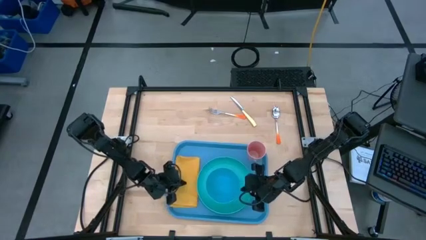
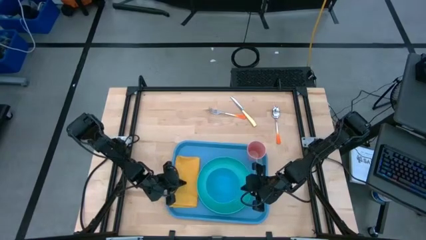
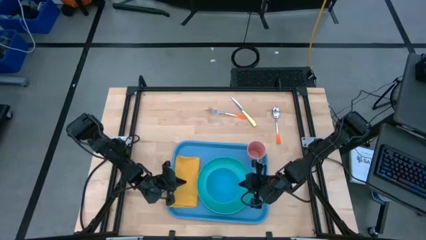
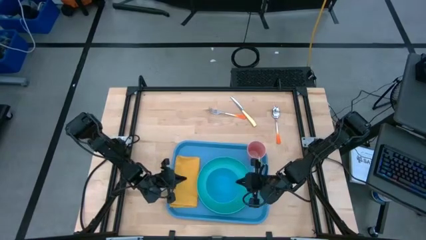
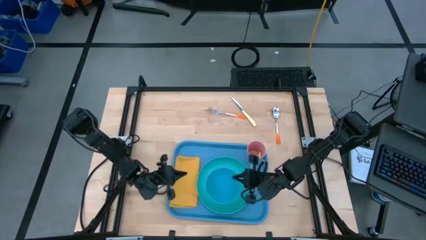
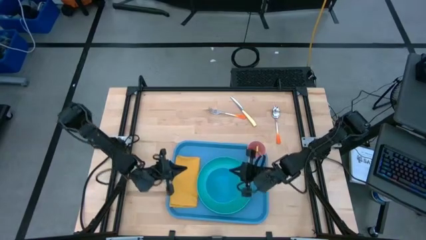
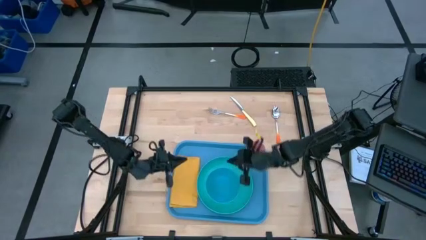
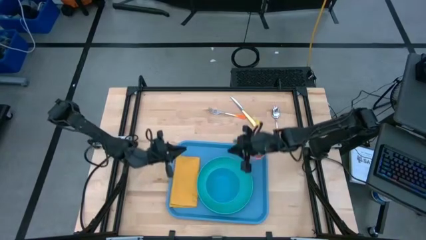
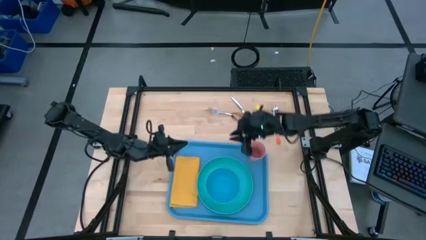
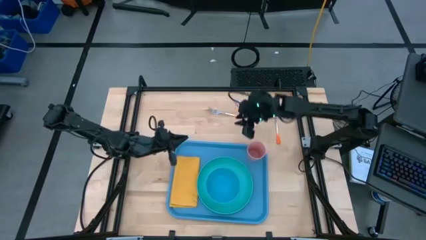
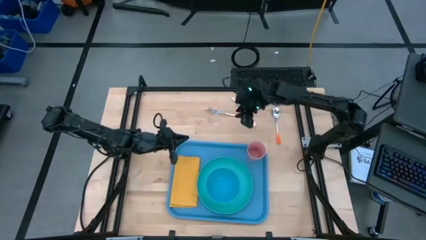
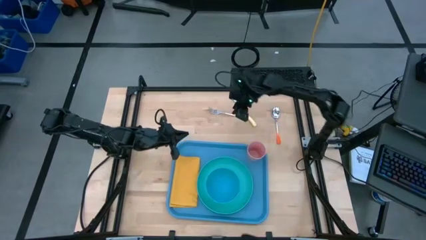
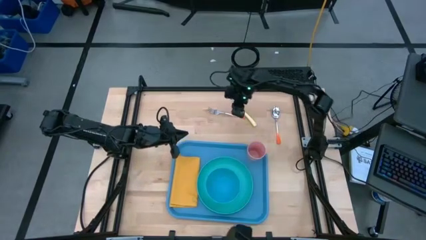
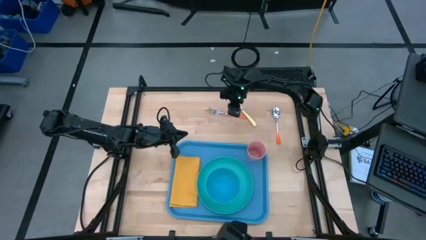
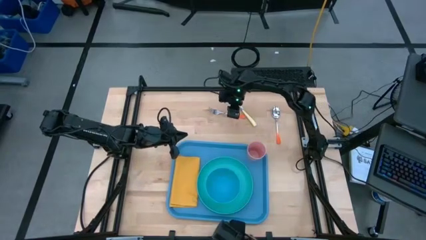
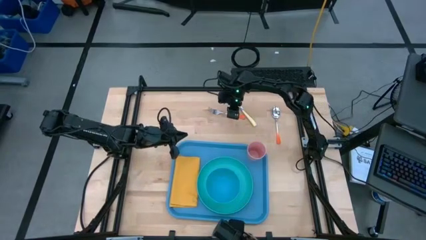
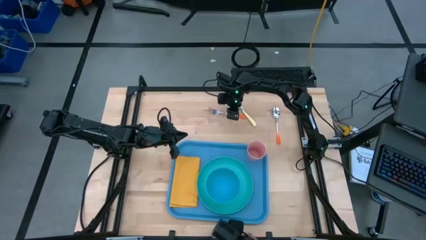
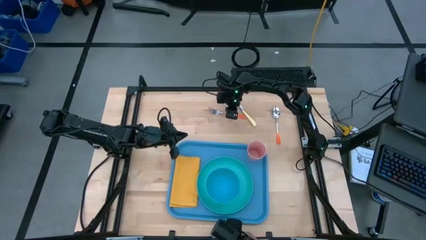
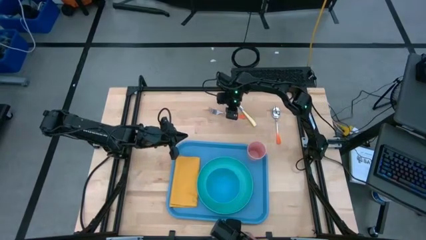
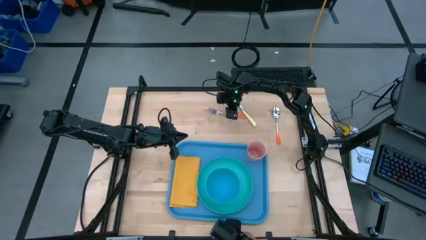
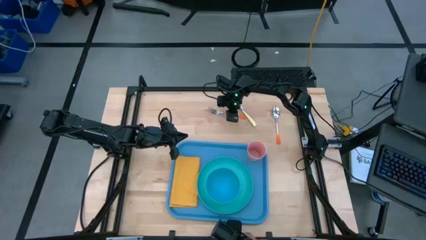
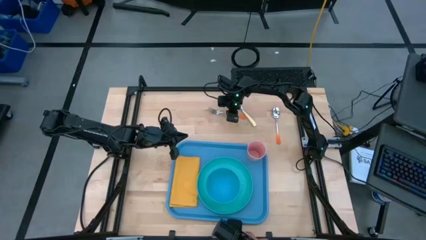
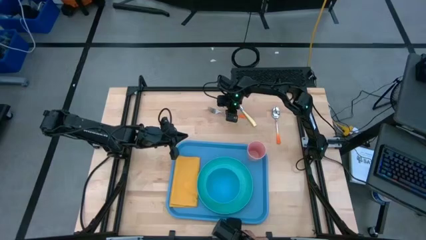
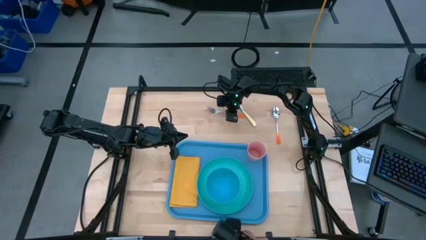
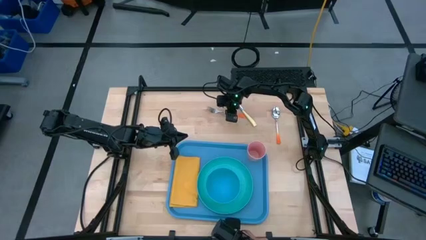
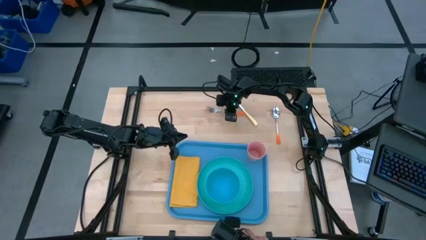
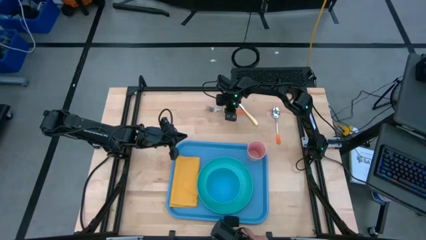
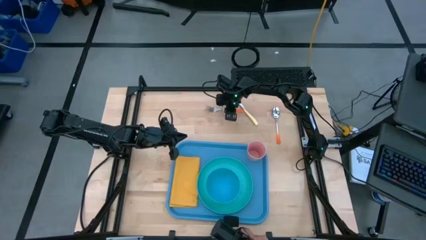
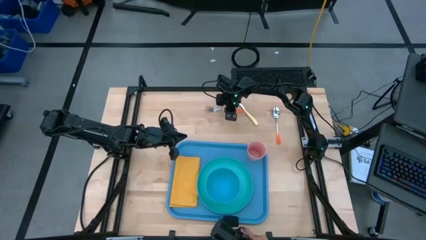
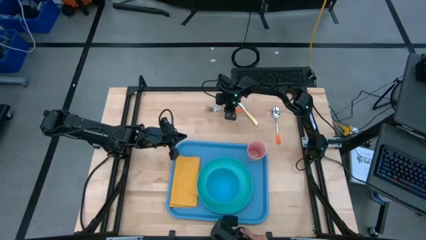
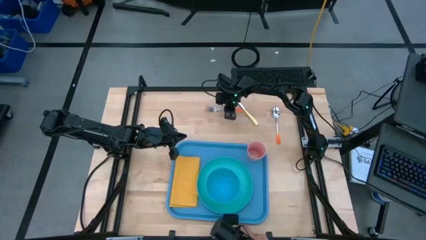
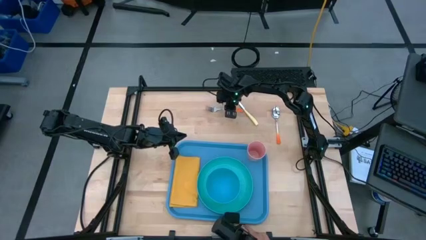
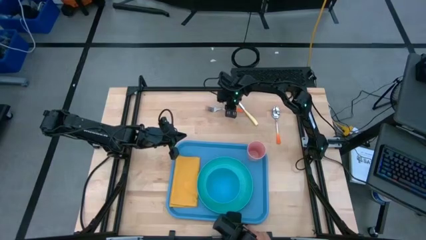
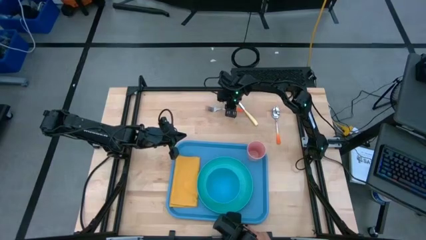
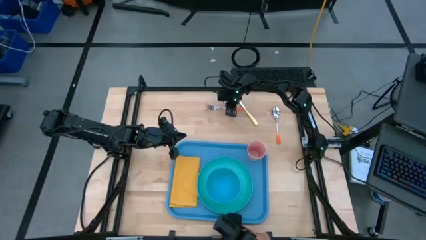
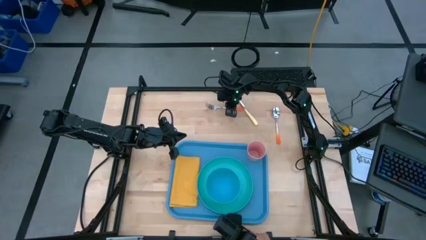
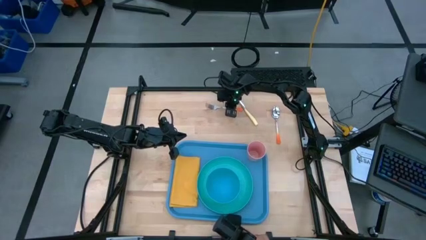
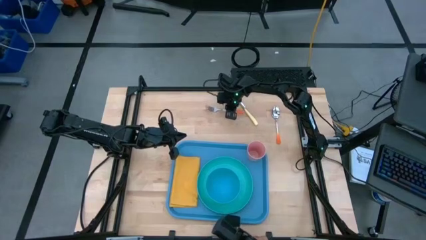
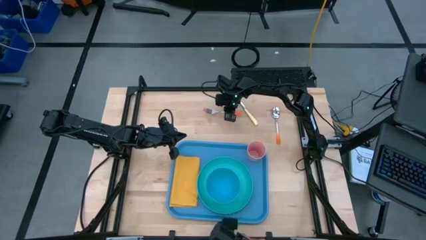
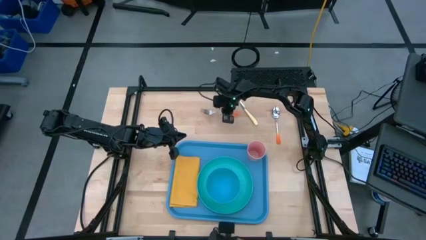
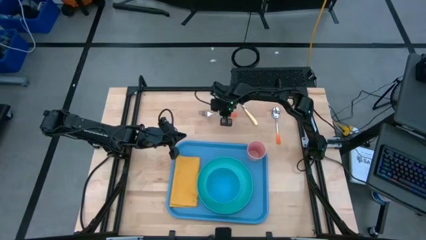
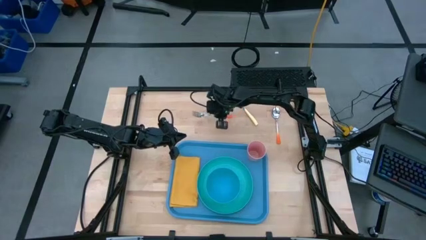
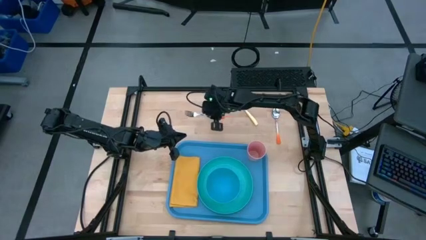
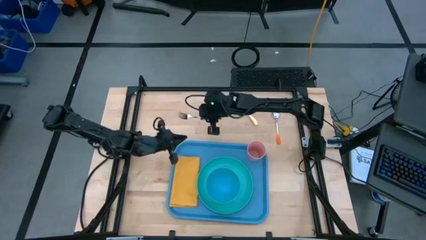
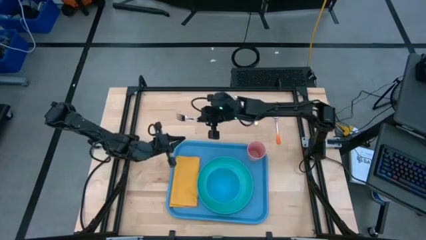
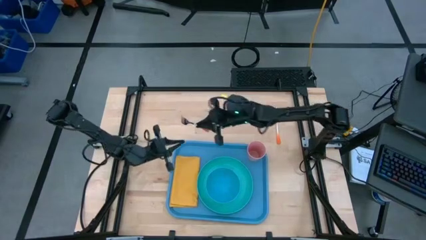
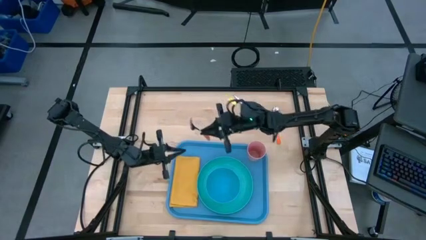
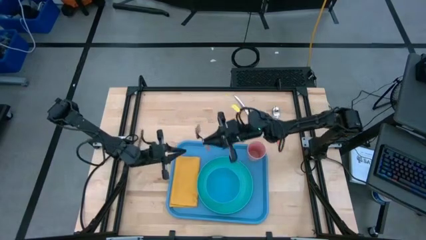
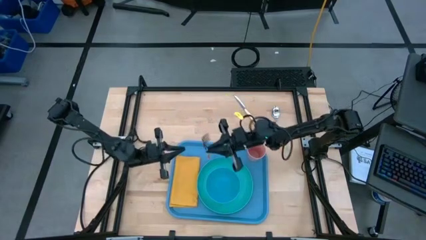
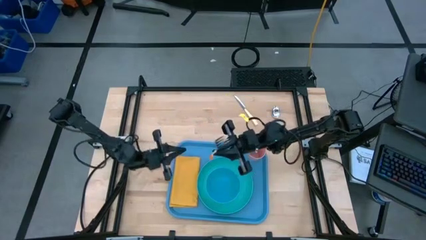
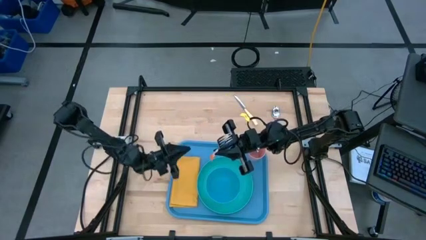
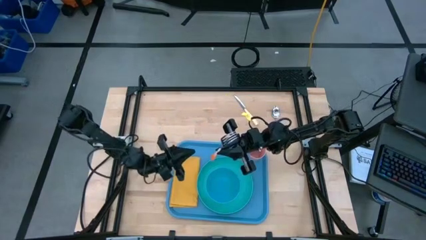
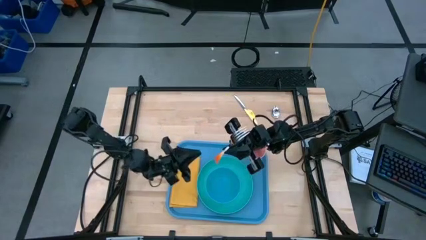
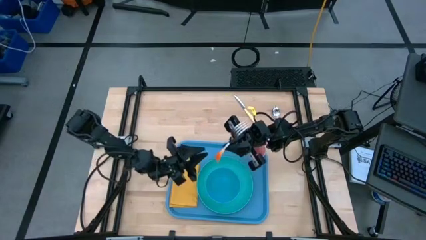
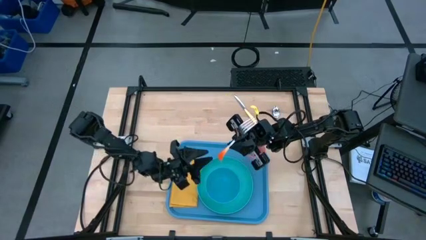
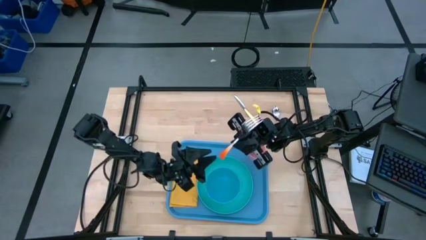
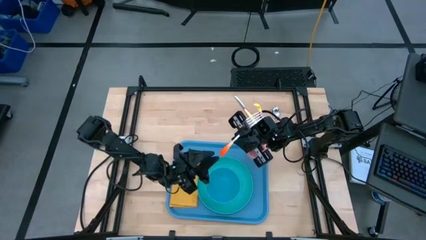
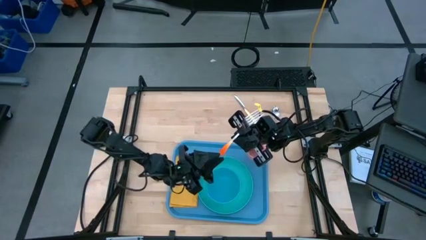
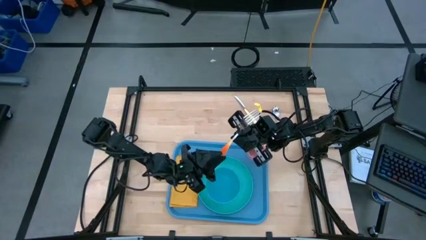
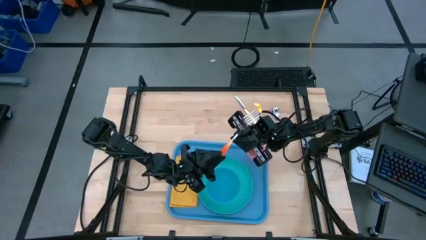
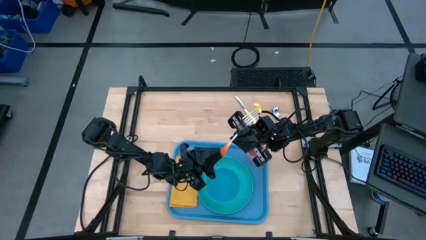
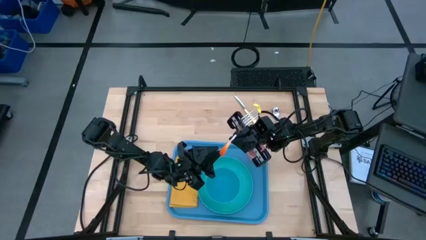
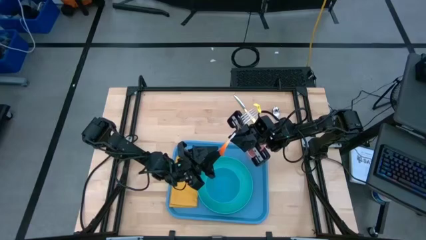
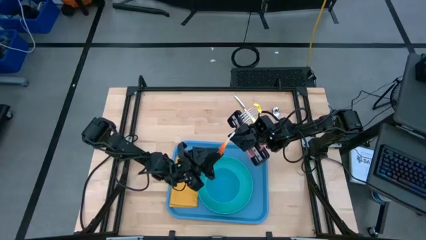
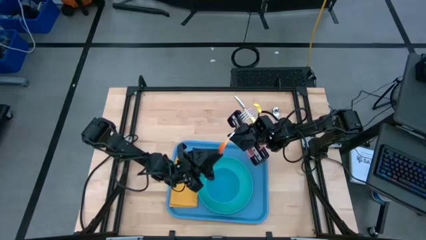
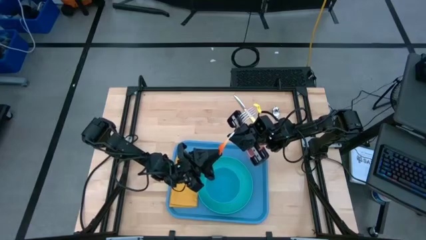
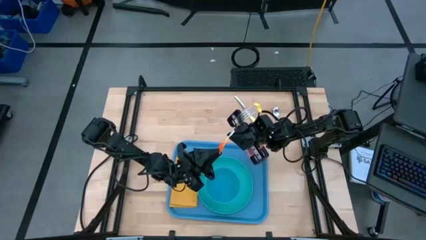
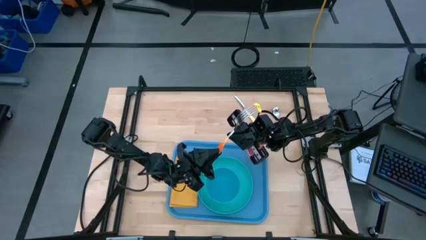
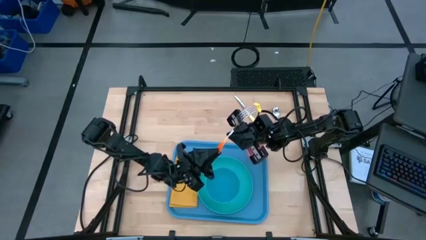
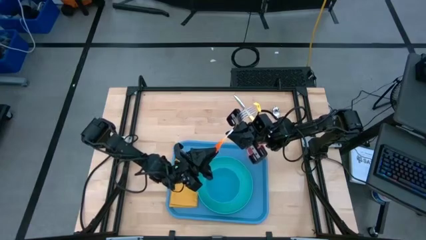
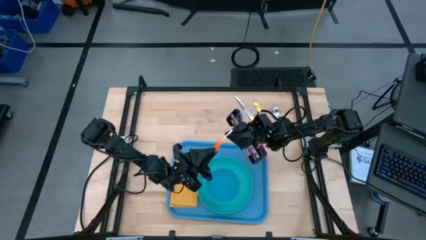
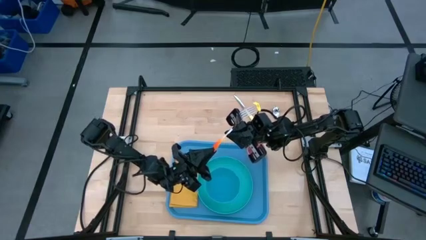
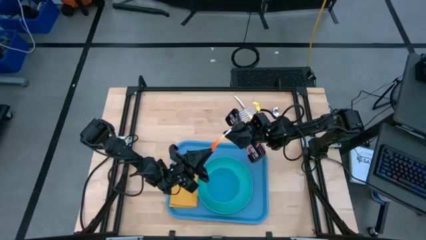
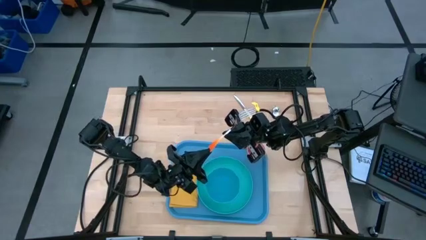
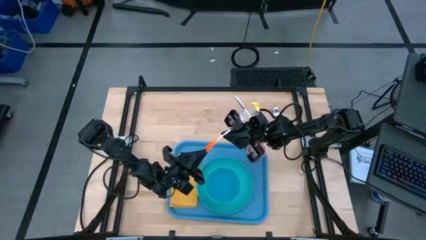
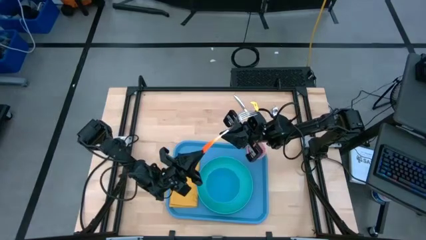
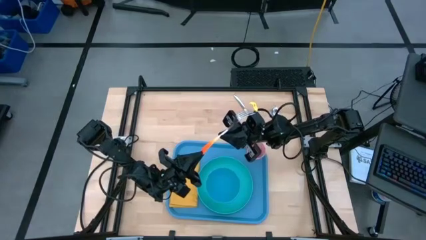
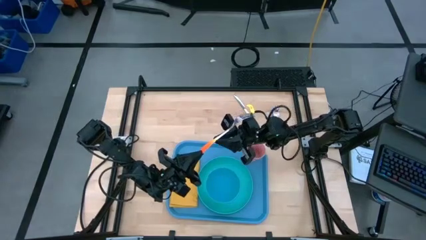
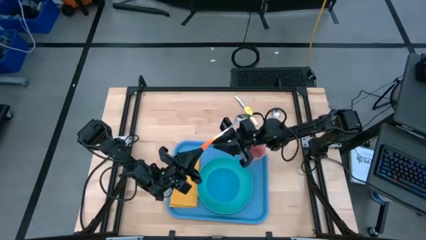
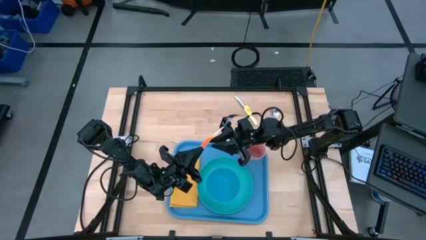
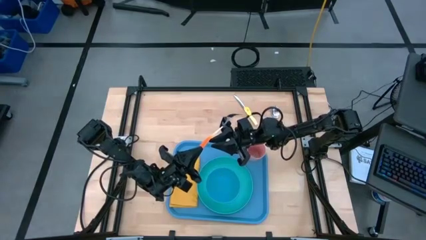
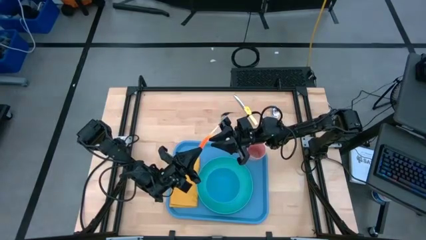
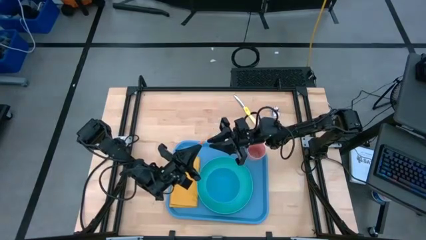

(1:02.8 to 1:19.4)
Task: Set up tray
Put the orange fork on the top of the yellow table napkin
